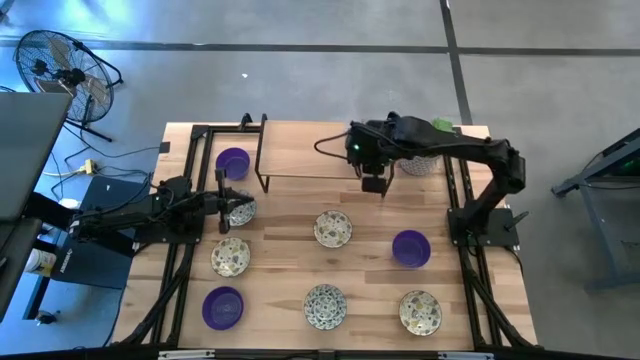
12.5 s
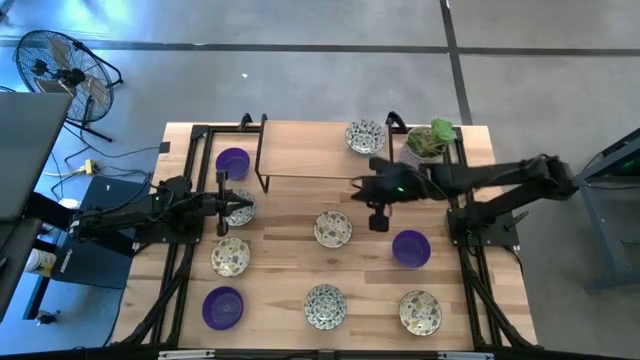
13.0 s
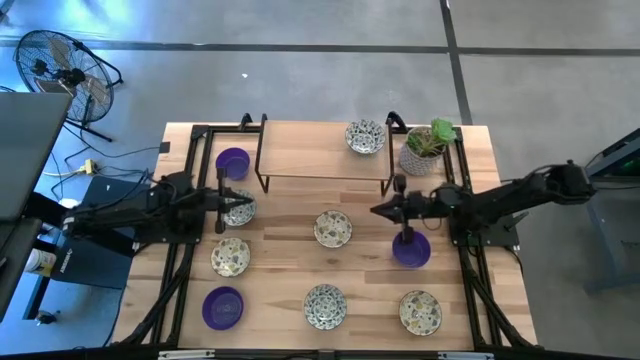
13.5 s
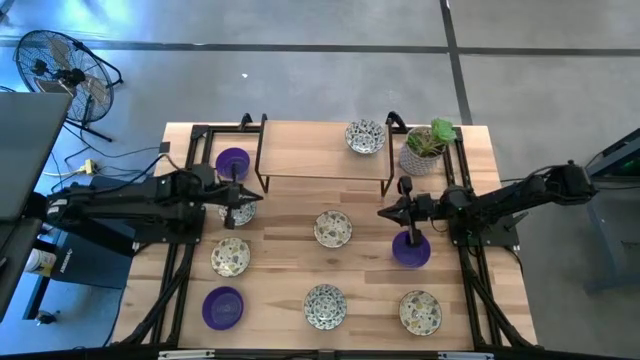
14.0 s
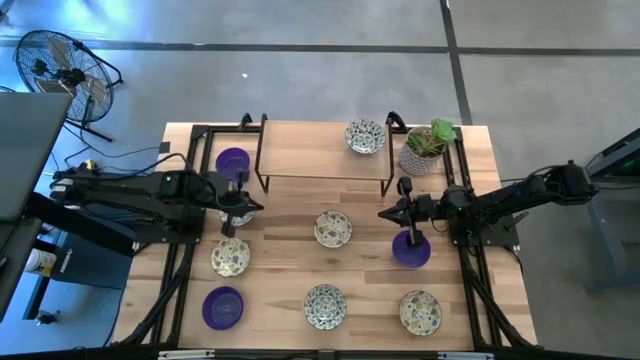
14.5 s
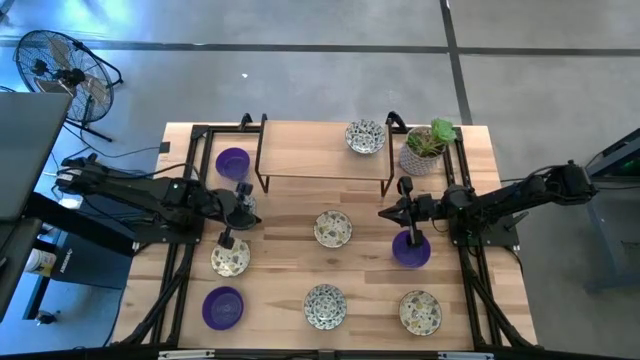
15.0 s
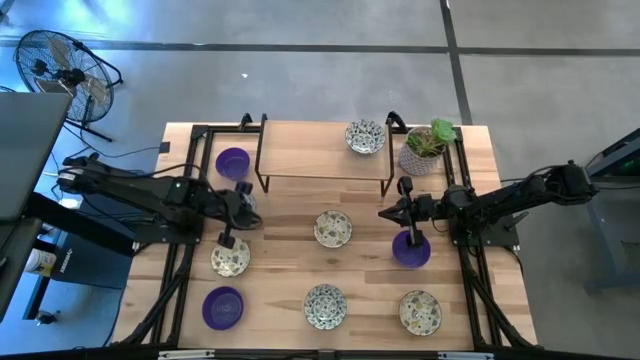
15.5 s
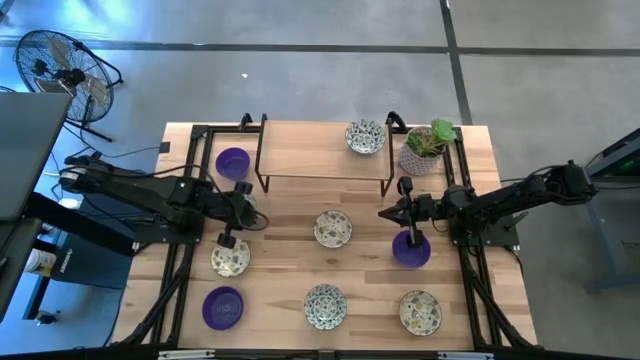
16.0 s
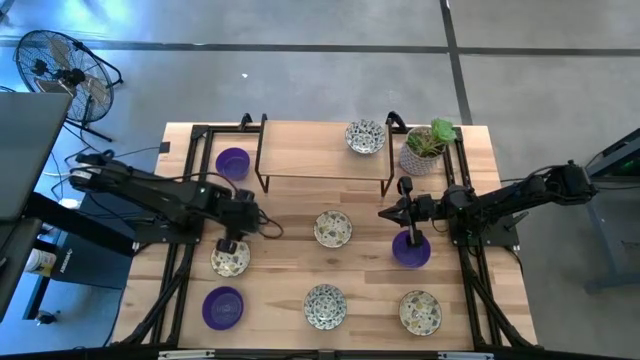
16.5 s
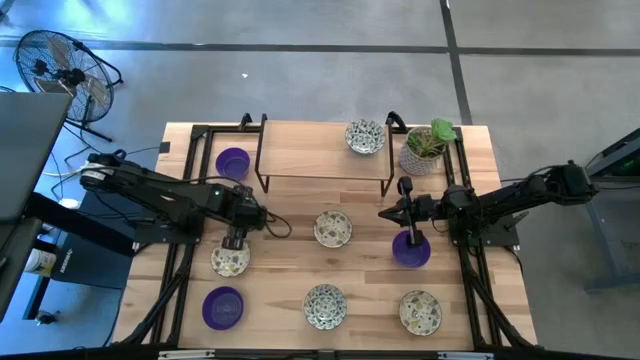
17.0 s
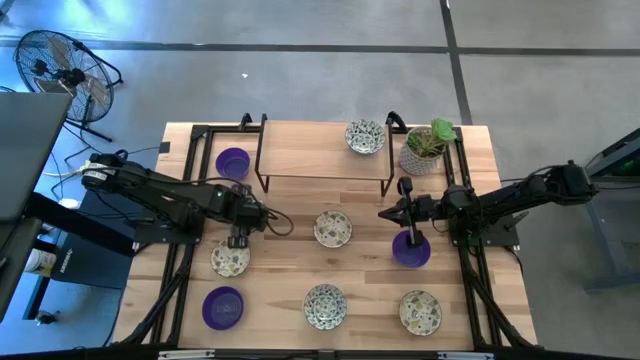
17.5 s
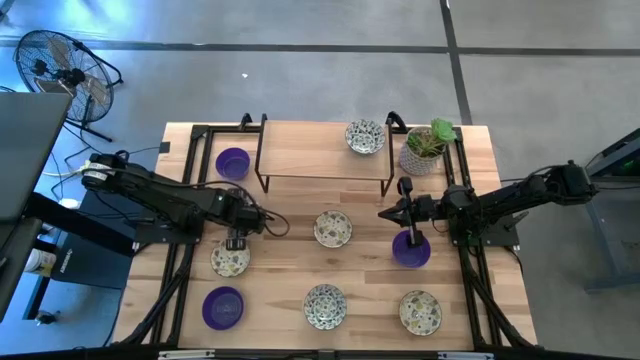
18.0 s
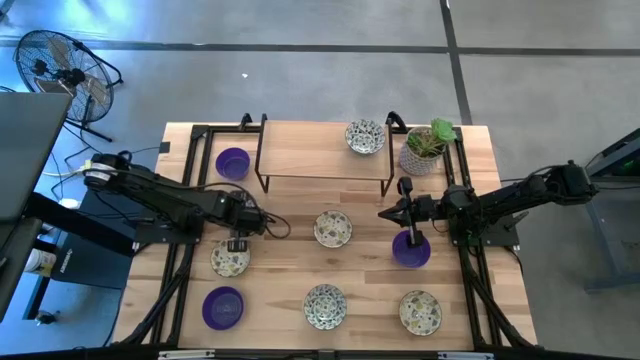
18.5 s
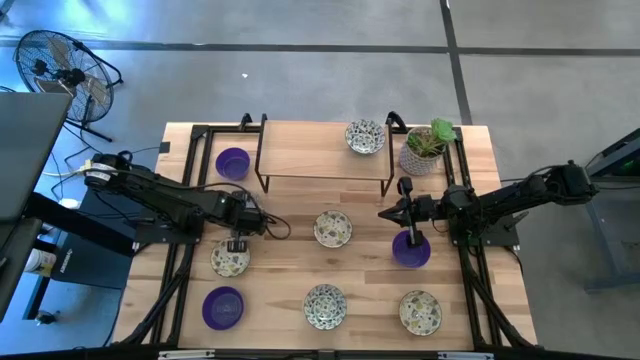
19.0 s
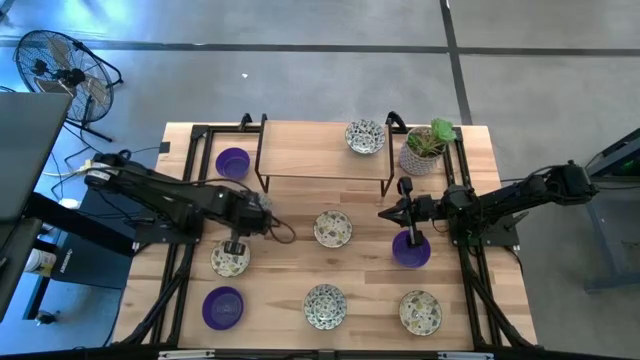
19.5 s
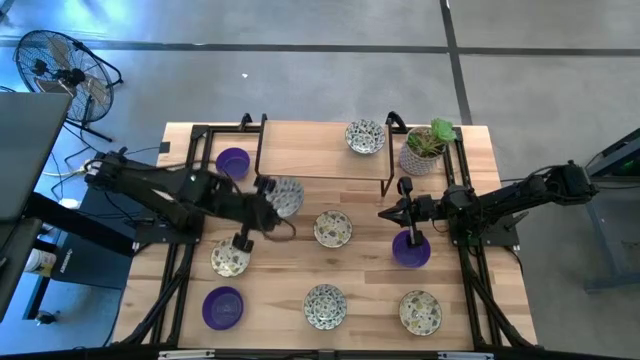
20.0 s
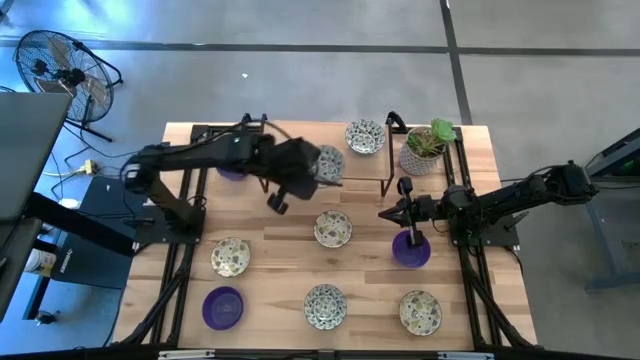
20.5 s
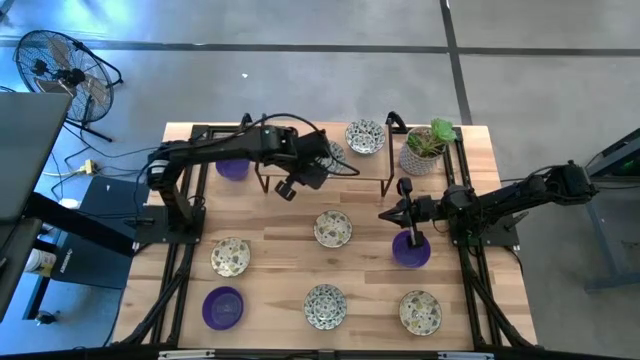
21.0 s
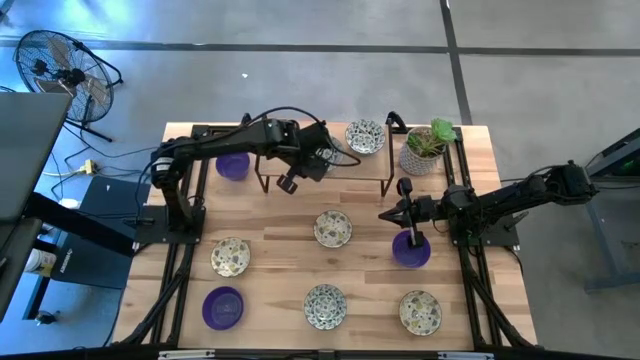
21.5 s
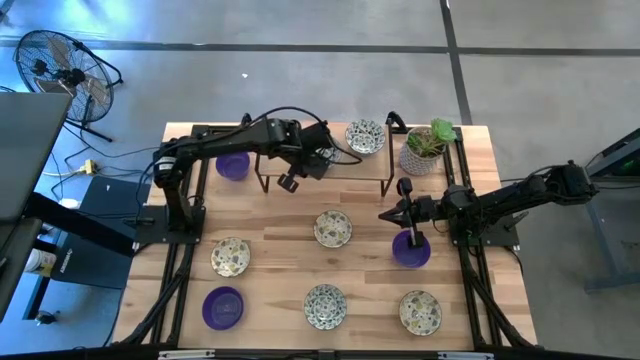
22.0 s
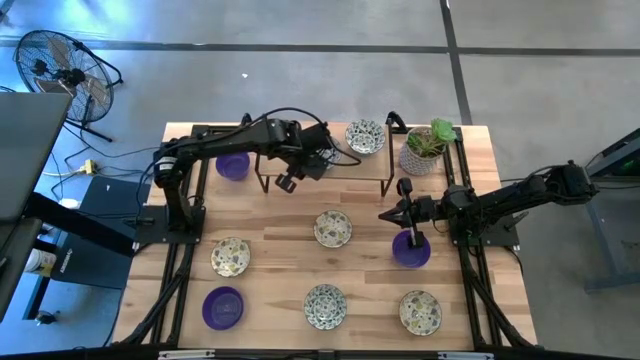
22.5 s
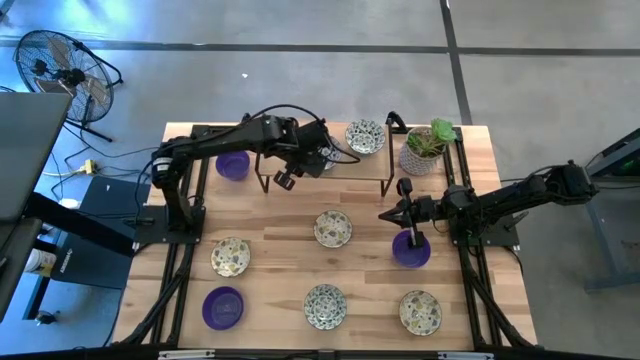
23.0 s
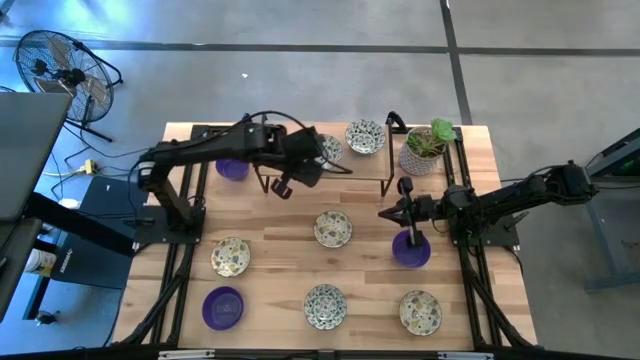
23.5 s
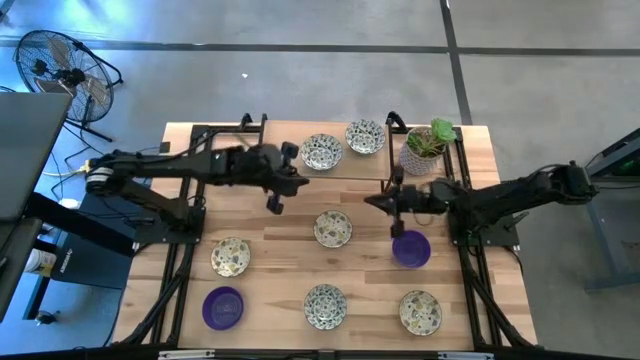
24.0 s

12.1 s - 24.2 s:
Task: Pick & Place Mini bowls
Stack the top blue patterned bowl on the blue bowl on the shelf

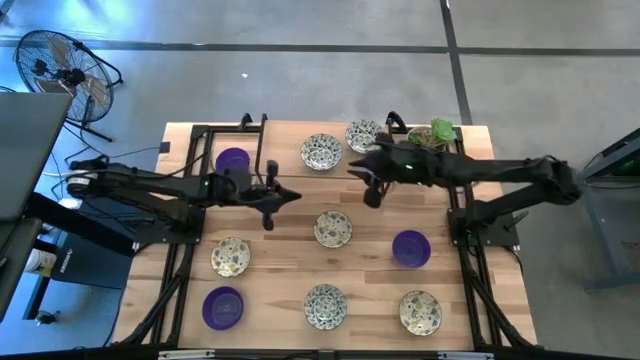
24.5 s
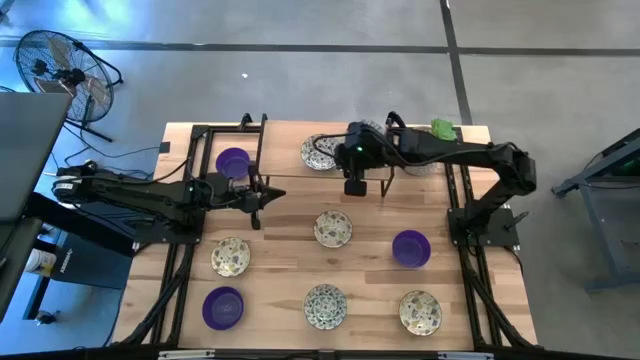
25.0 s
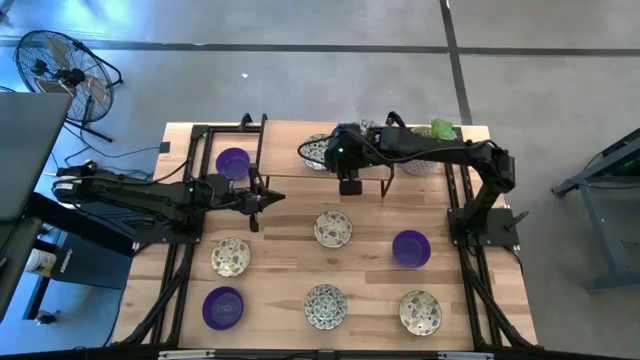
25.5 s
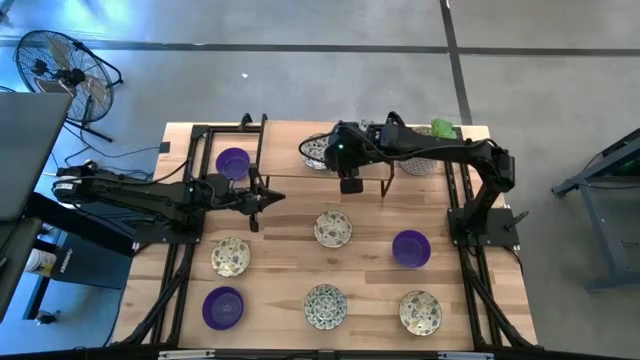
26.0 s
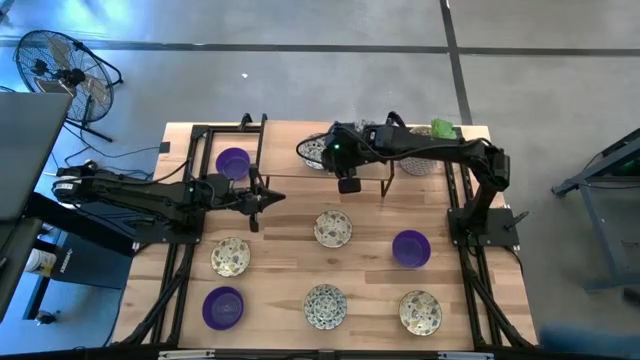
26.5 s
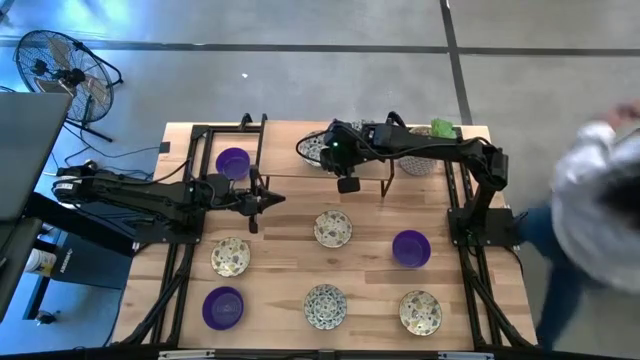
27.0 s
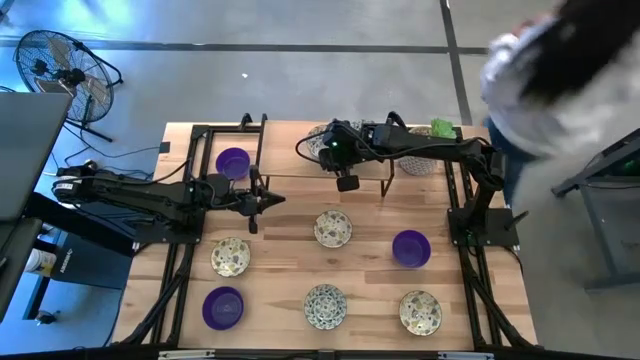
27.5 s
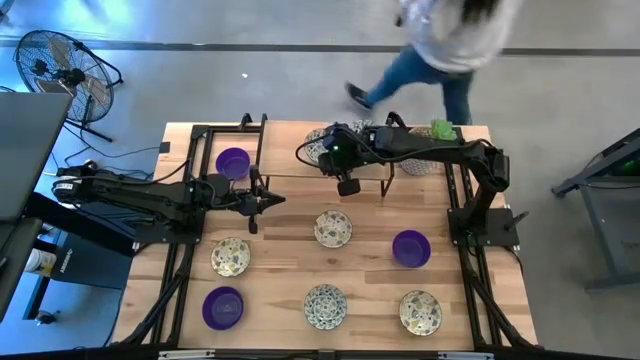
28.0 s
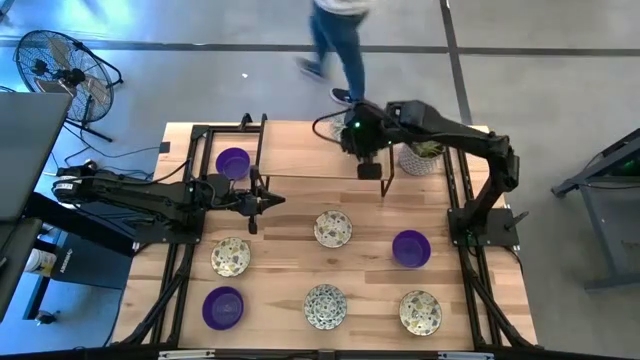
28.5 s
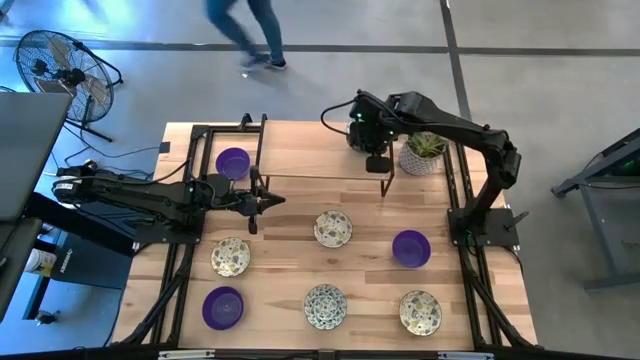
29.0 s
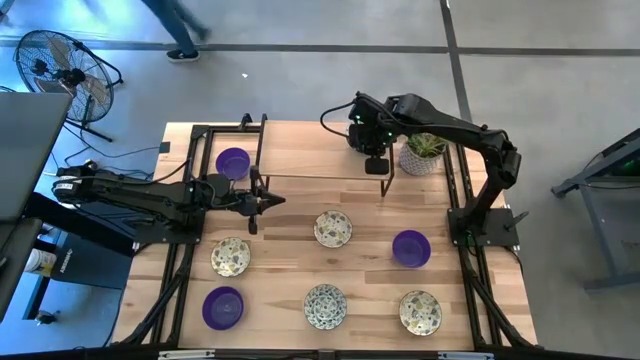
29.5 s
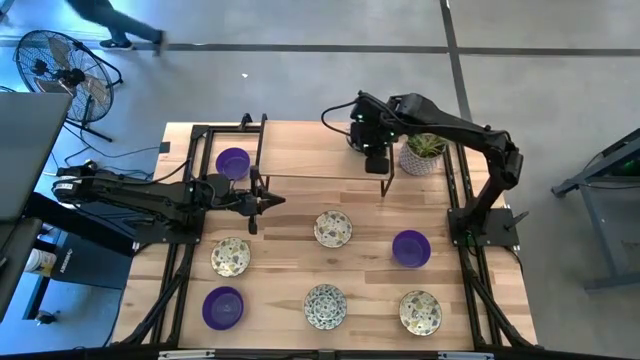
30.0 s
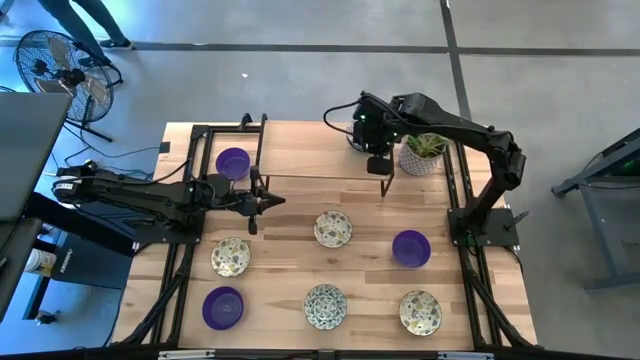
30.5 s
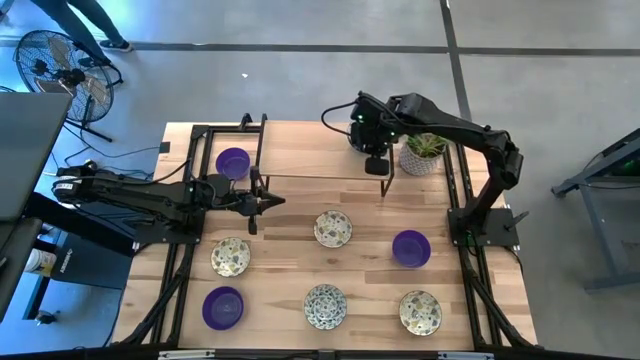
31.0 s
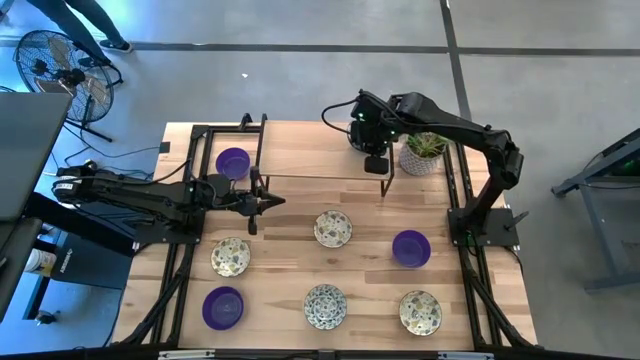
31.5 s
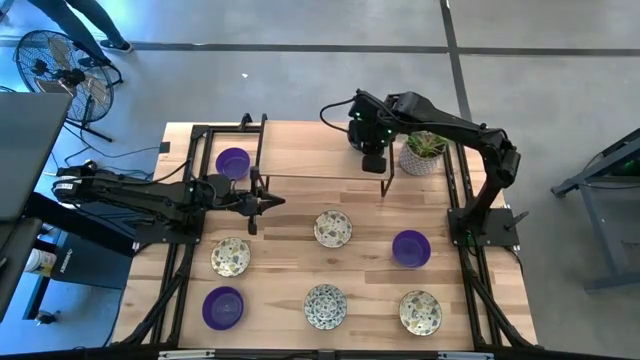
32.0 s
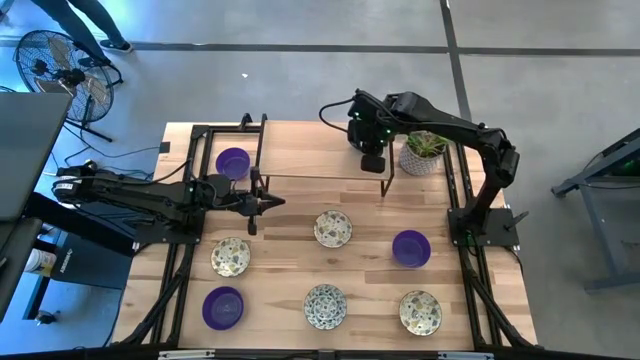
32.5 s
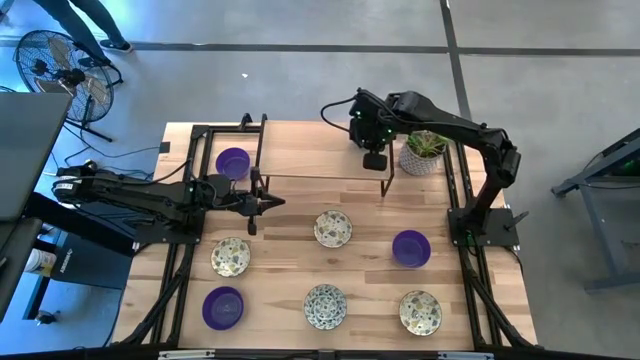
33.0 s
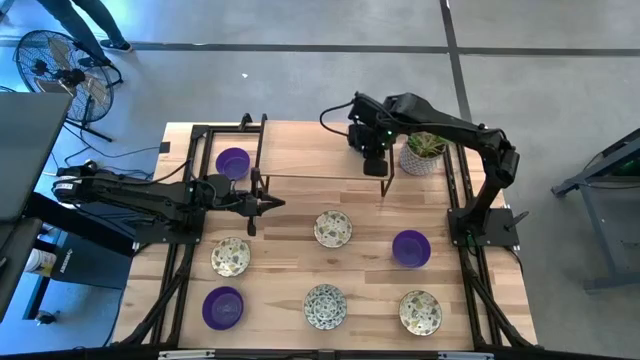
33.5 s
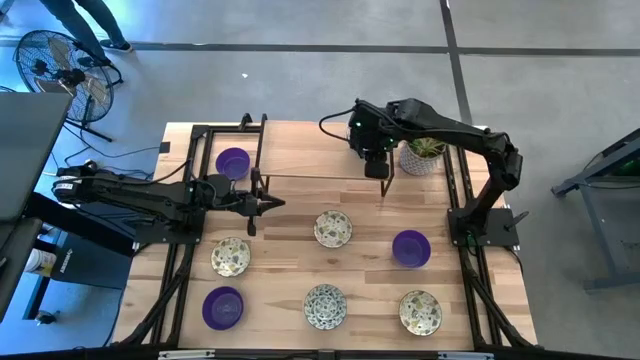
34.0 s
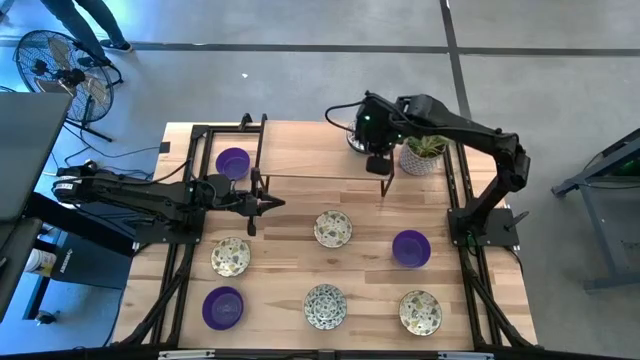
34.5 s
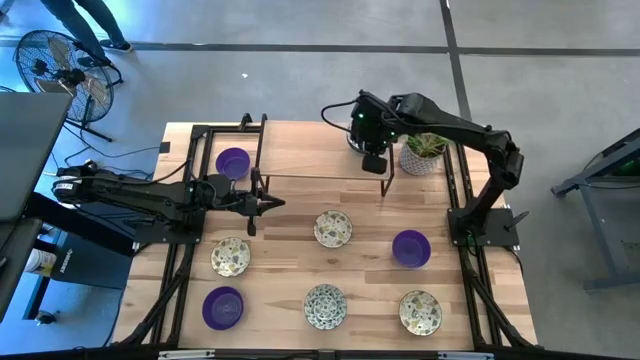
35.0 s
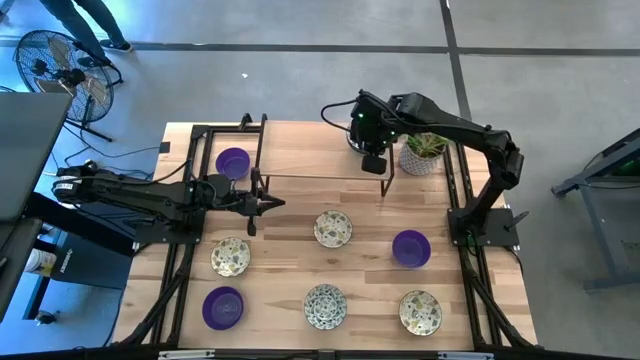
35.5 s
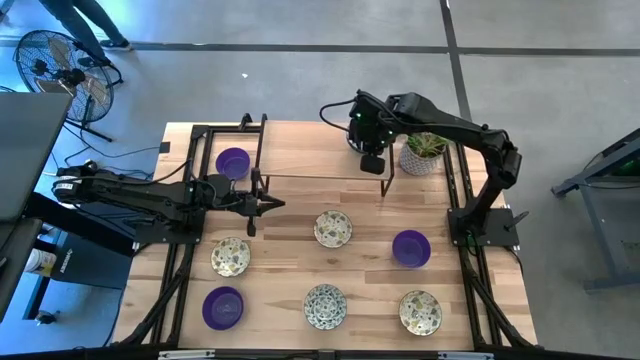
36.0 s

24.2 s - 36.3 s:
Stack the top blue patterned bowl on the blue bowl on the shelf
